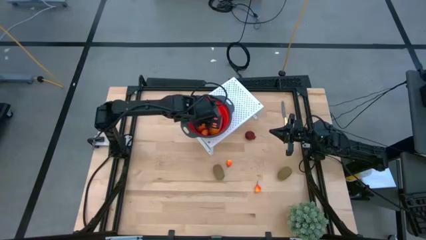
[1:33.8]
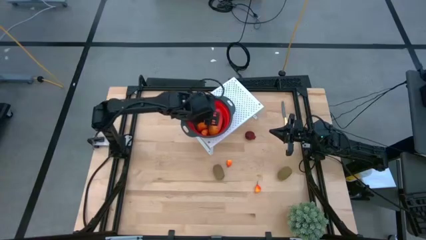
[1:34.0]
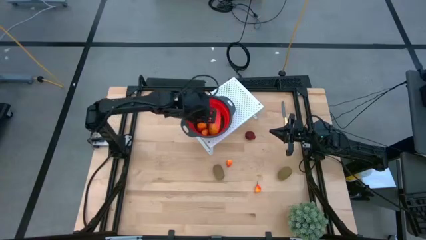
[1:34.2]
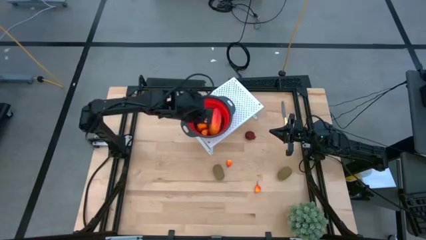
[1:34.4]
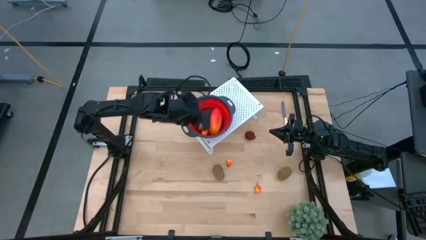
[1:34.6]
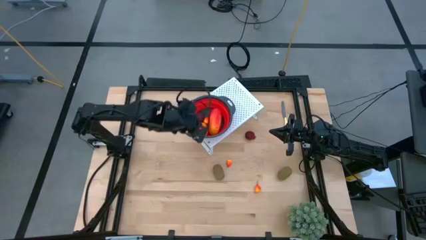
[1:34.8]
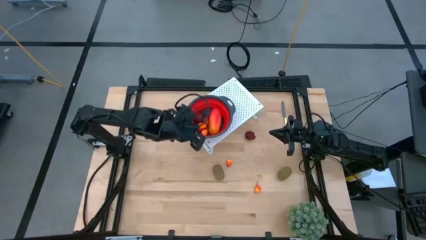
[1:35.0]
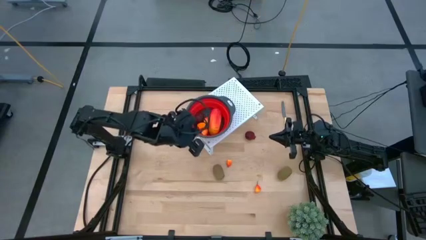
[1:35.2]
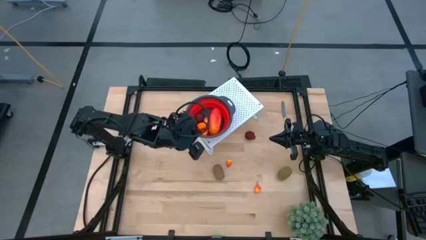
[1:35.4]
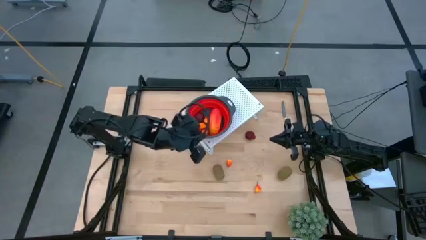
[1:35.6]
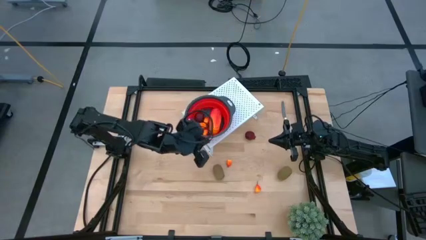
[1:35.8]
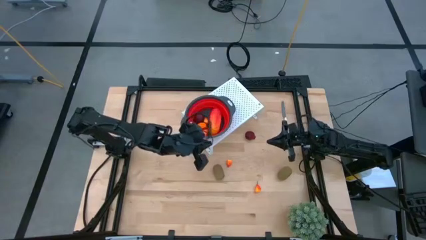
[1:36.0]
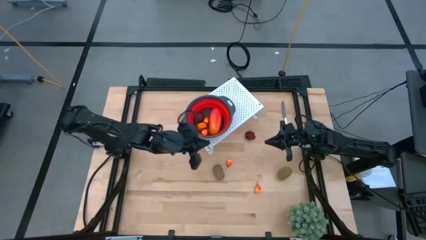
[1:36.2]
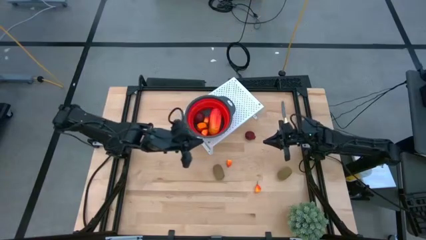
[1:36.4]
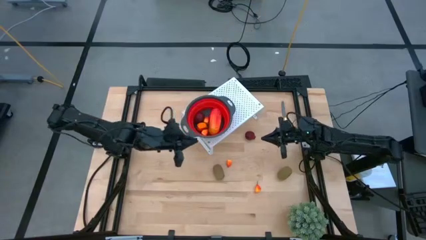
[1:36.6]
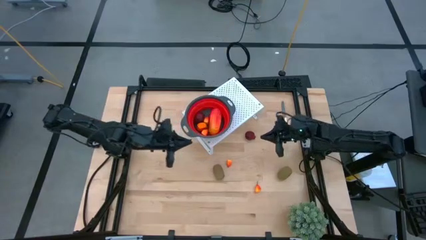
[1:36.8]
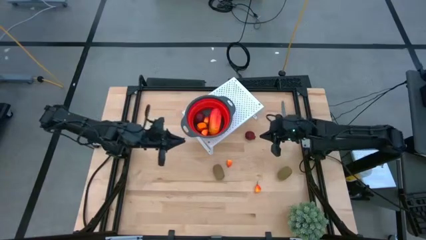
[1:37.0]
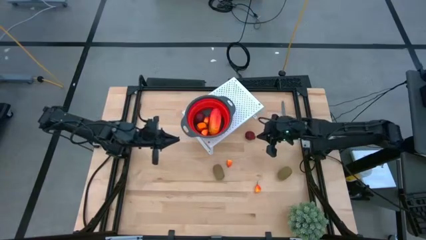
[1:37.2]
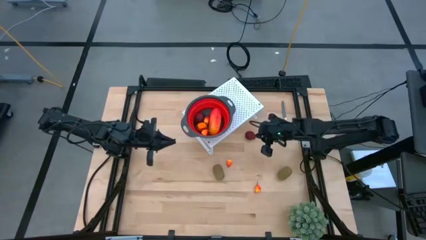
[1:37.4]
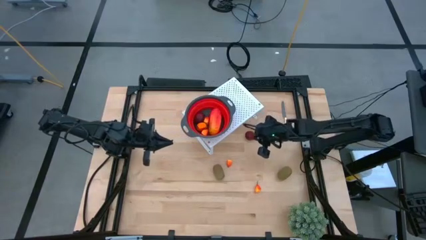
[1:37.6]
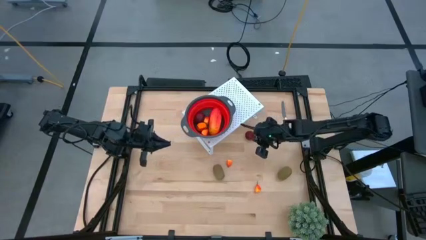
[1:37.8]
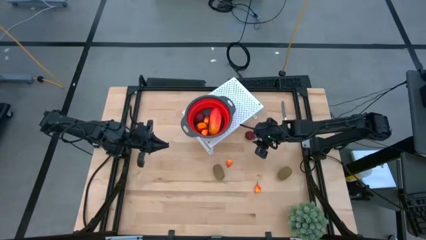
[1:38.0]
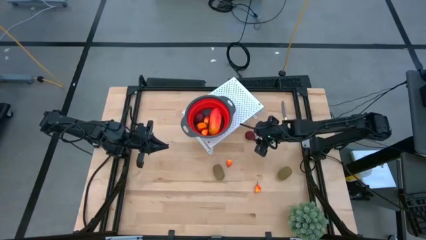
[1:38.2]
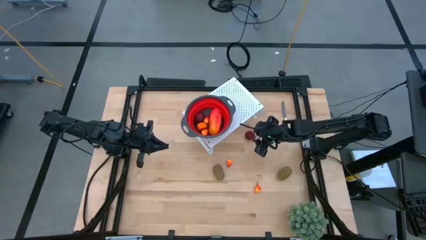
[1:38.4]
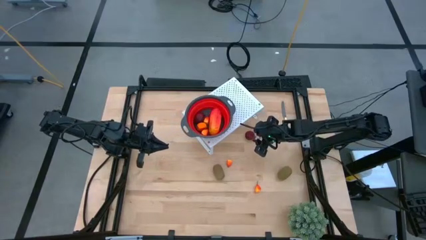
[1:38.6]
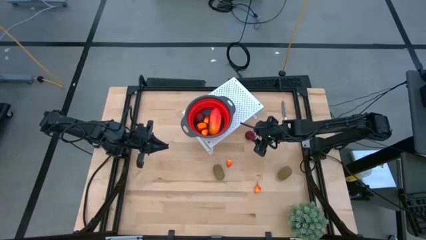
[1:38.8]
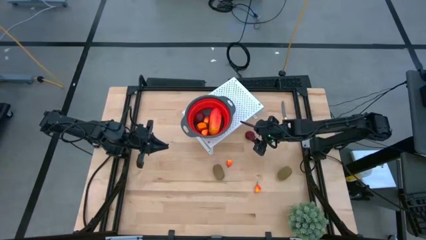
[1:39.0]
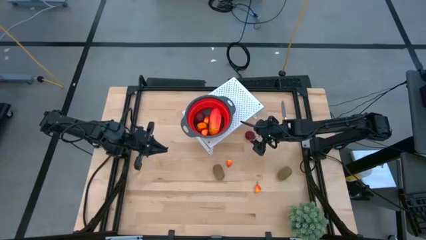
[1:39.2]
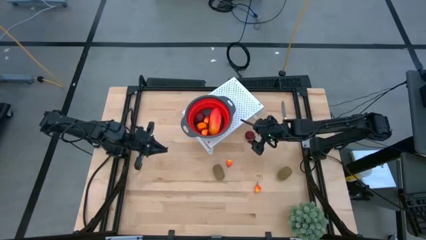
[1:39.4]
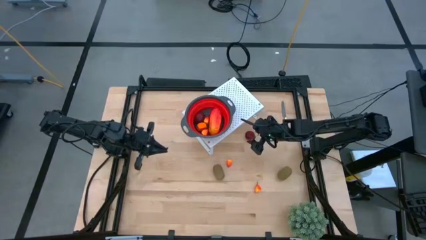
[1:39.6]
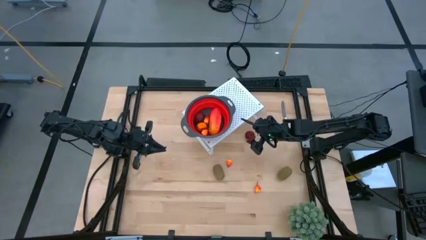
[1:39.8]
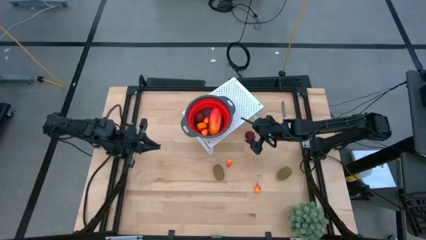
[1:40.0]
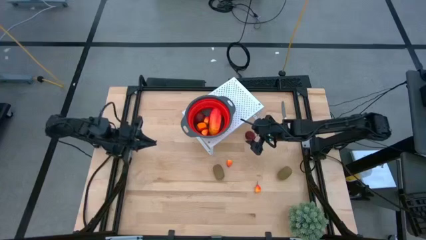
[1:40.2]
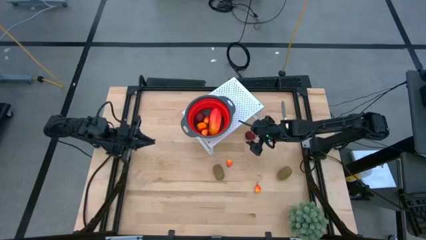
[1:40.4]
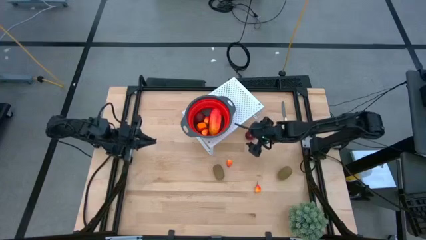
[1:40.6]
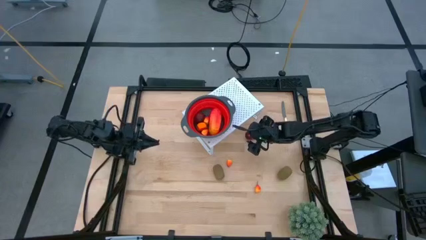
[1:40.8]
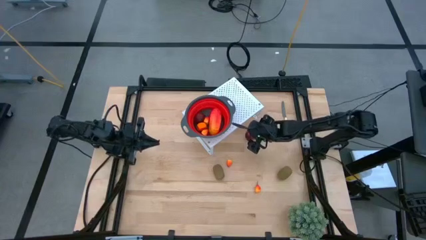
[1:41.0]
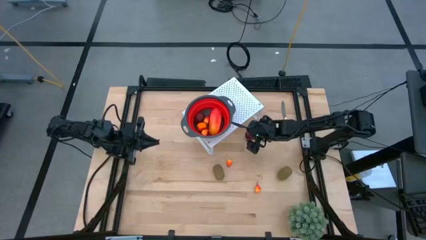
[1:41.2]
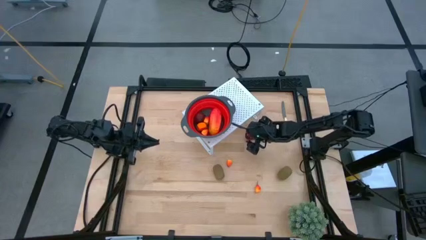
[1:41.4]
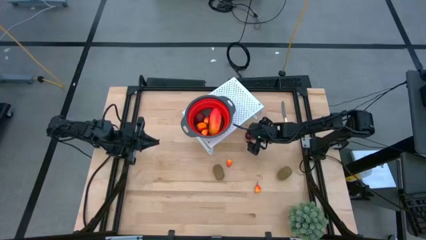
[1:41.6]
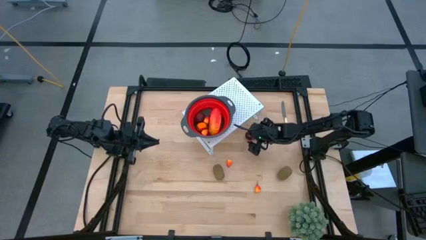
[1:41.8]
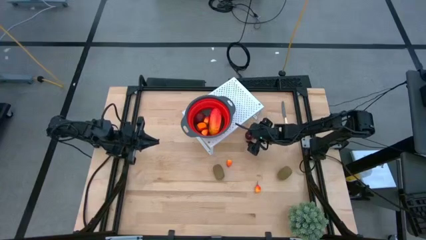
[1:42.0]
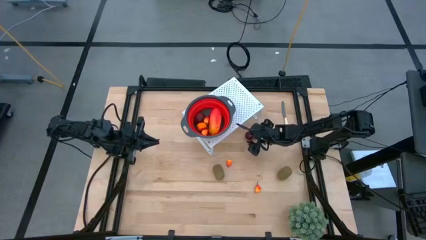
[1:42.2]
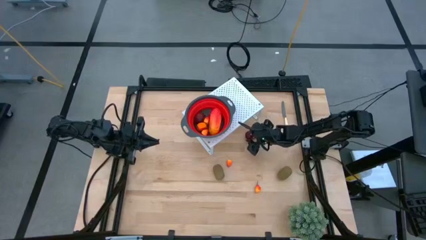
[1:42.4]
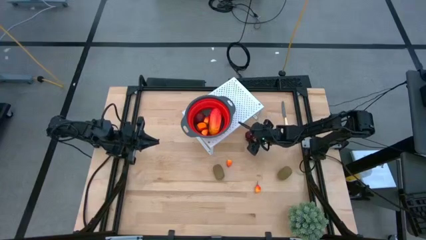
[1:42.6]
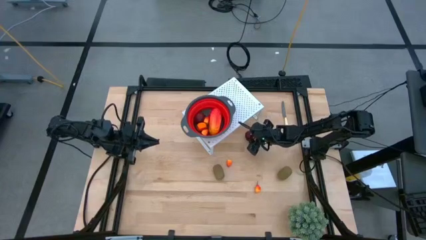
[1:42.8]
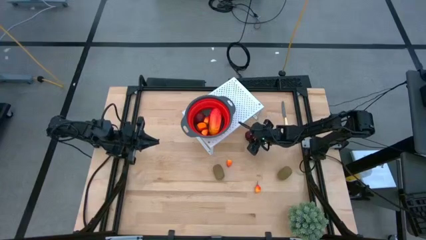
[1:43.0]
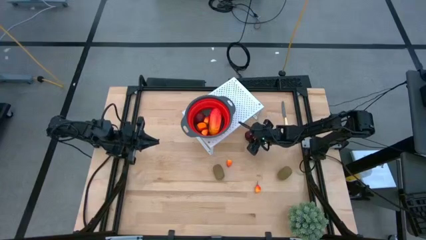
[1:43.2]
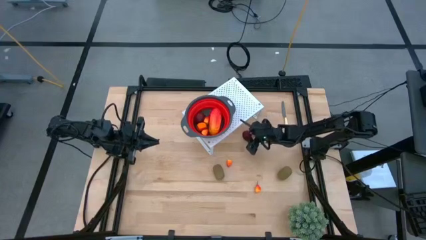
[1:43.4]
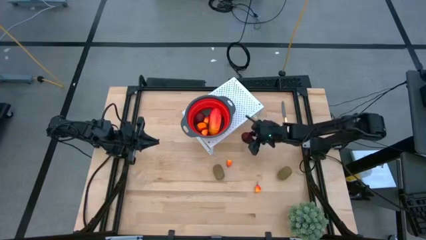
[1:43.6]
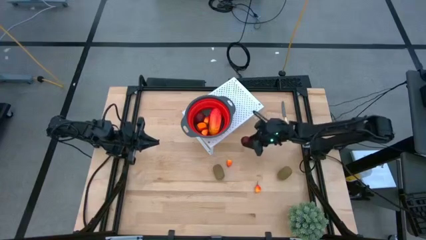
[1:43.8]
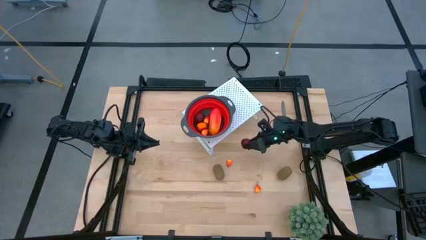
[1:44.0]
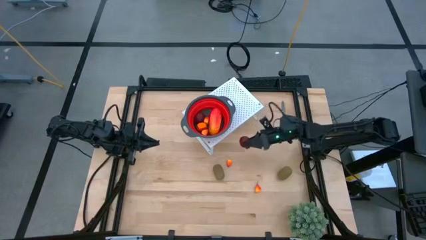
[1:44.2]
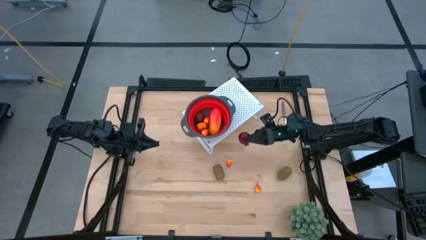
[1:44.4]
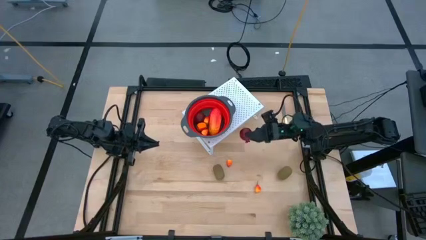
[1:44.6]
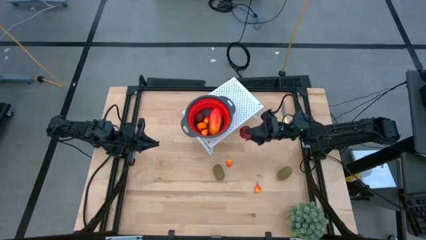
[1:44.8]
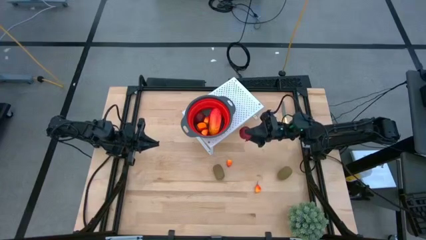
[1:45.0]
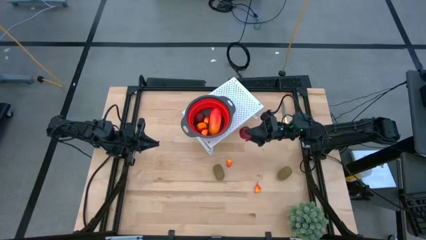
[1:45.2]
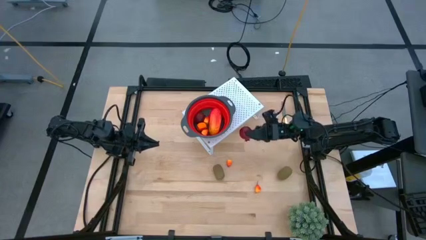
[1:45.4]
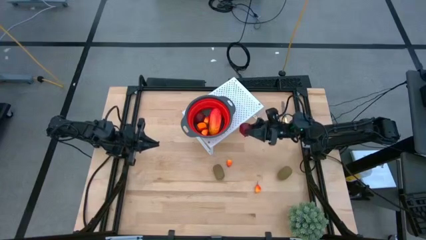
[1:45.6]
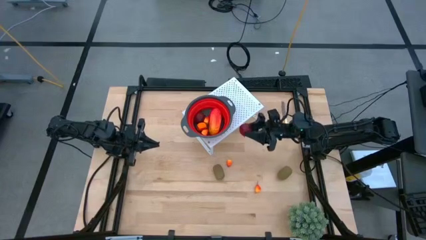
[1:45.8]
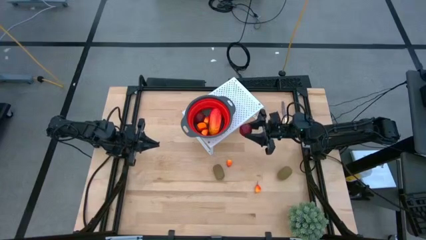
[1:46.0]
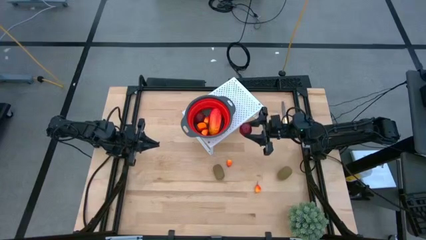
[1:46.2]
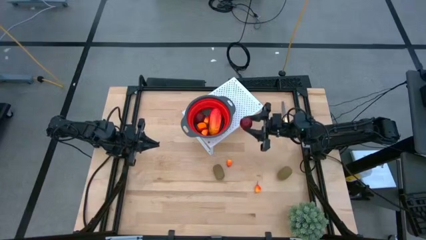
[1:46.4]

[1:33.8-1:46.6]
Task: Pick & Place Fruit
Put the pomegranate into the red strainer bowl on the shelf
